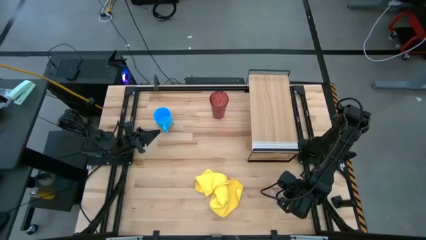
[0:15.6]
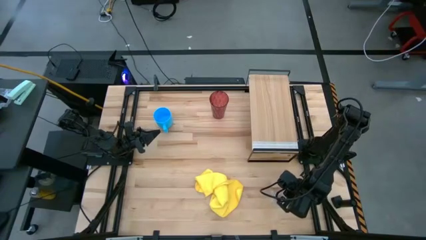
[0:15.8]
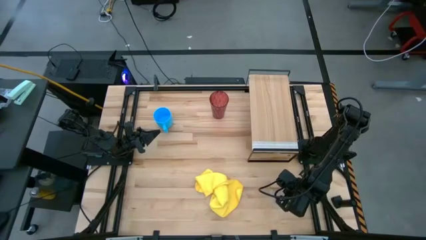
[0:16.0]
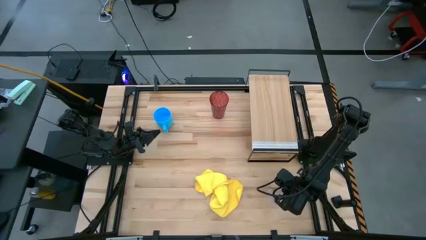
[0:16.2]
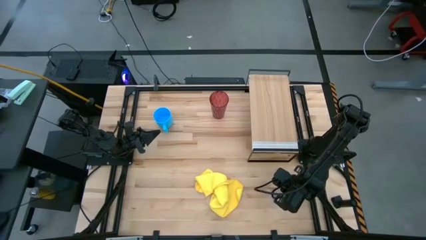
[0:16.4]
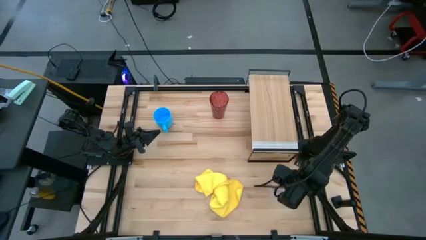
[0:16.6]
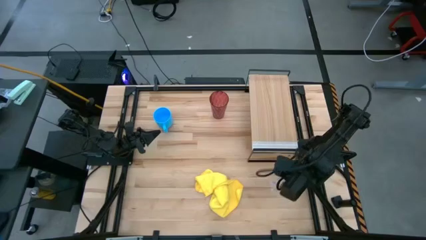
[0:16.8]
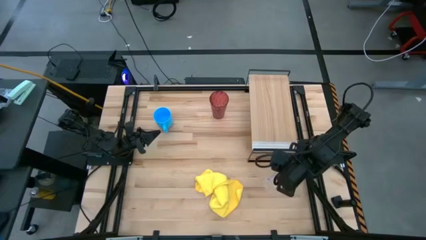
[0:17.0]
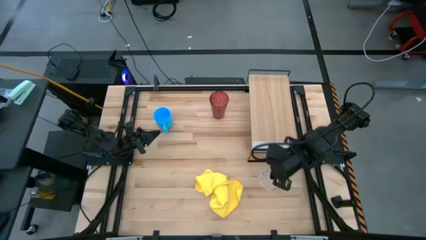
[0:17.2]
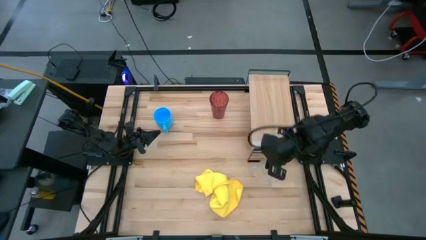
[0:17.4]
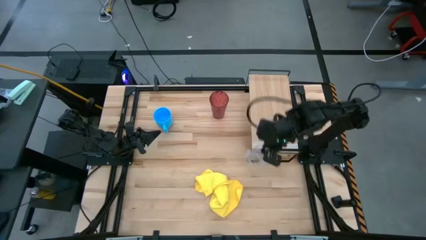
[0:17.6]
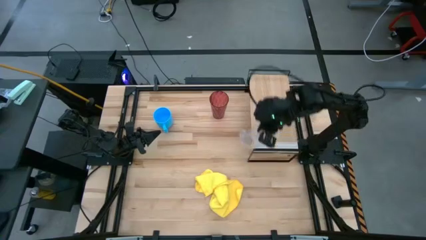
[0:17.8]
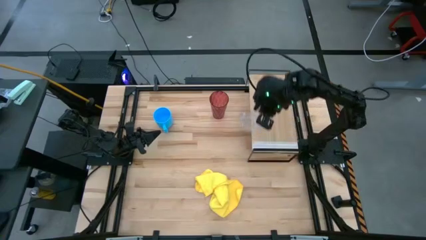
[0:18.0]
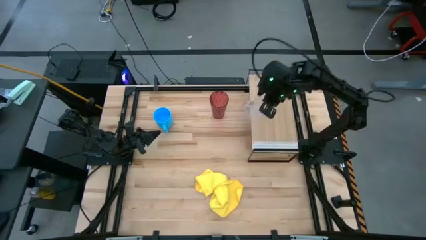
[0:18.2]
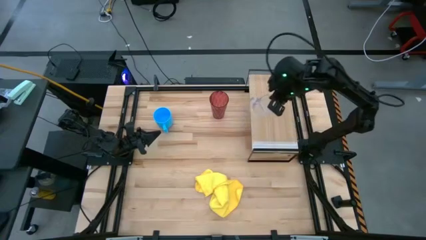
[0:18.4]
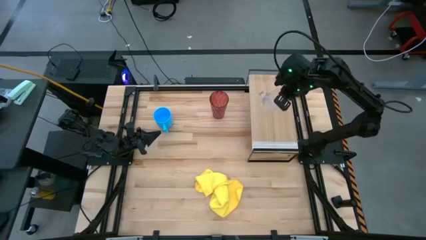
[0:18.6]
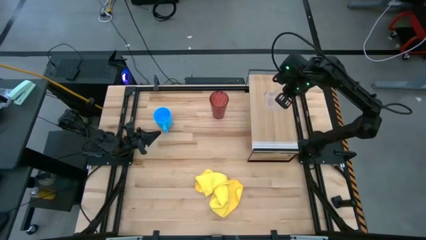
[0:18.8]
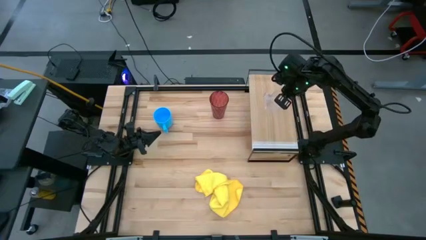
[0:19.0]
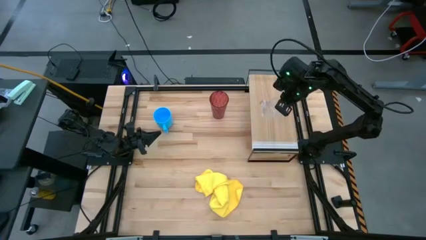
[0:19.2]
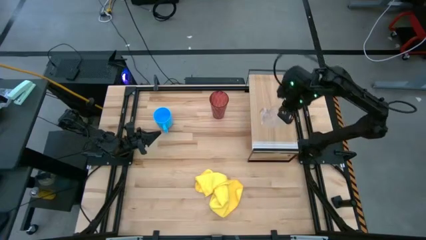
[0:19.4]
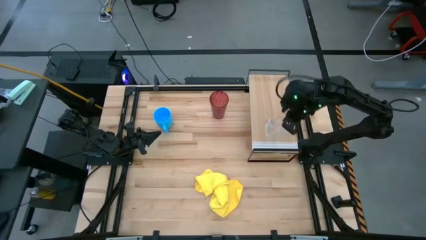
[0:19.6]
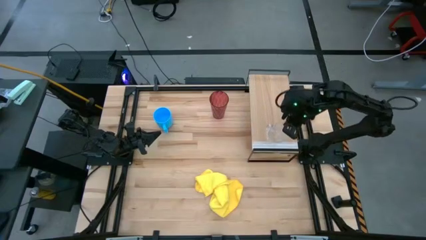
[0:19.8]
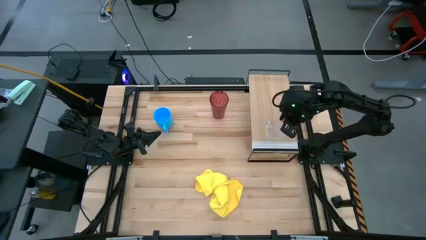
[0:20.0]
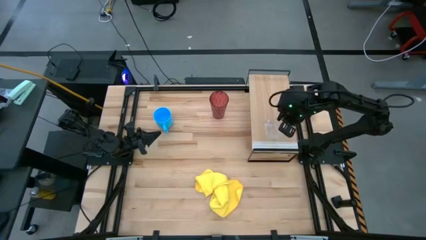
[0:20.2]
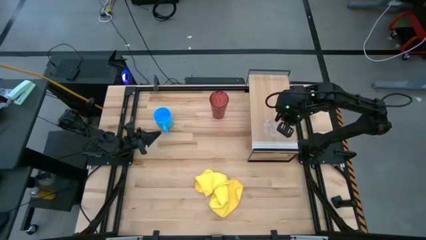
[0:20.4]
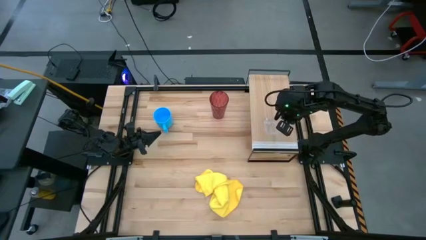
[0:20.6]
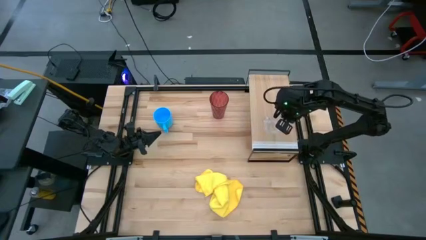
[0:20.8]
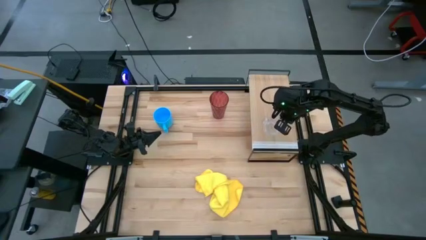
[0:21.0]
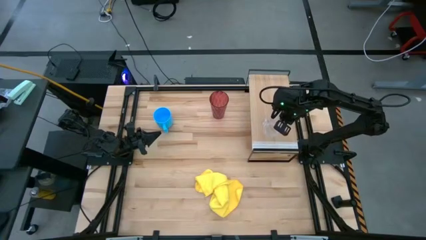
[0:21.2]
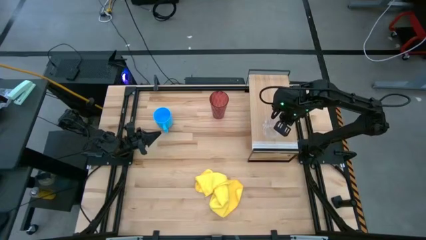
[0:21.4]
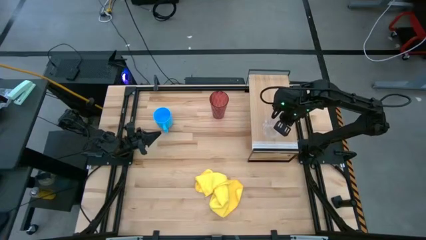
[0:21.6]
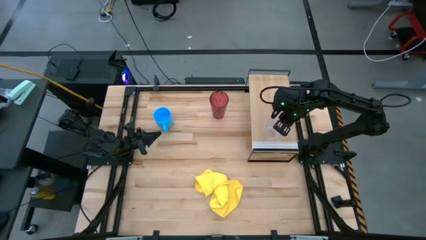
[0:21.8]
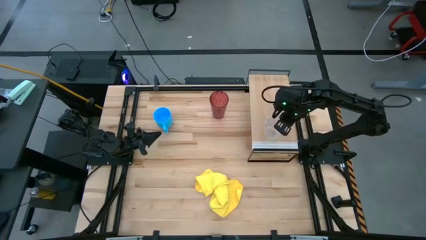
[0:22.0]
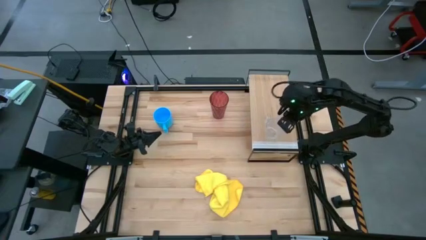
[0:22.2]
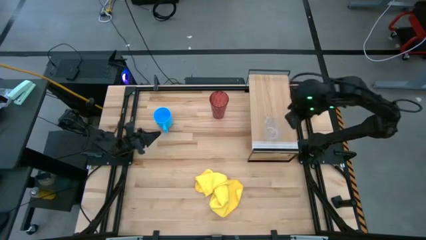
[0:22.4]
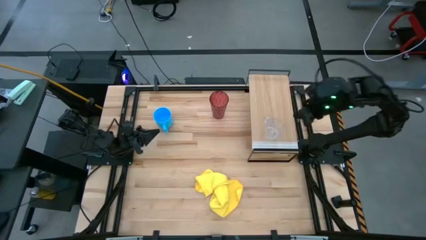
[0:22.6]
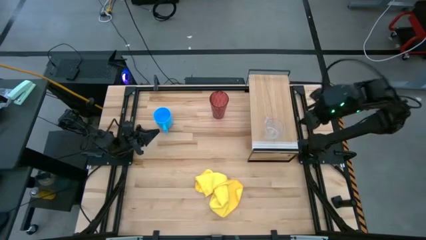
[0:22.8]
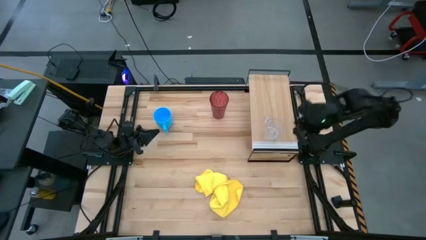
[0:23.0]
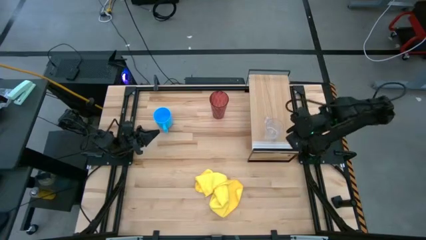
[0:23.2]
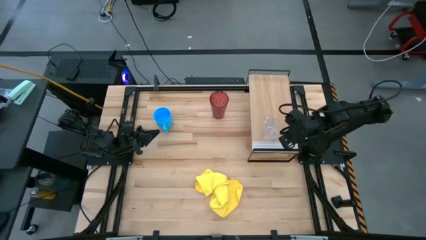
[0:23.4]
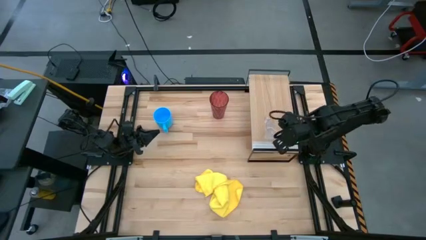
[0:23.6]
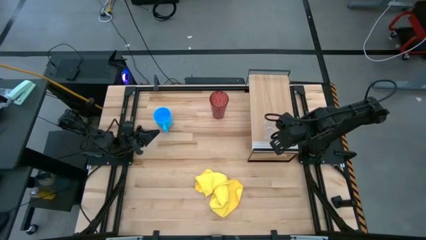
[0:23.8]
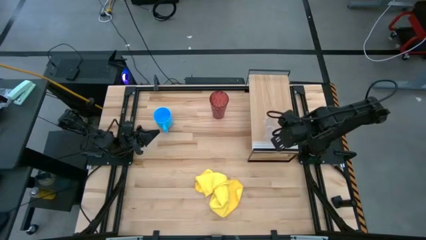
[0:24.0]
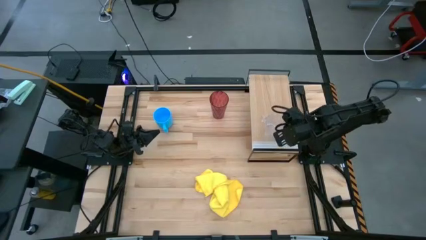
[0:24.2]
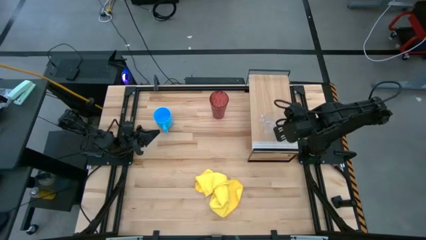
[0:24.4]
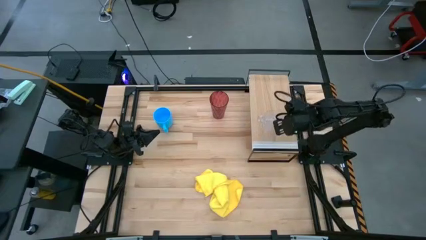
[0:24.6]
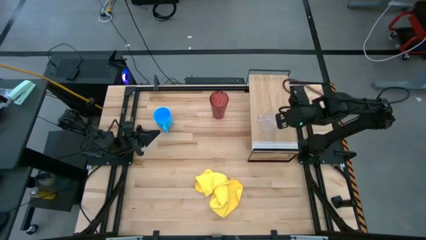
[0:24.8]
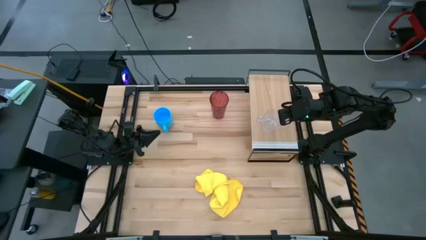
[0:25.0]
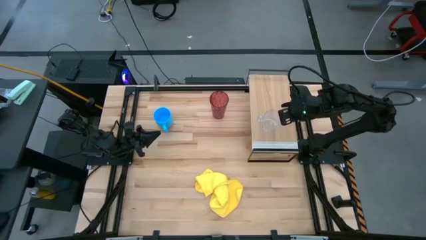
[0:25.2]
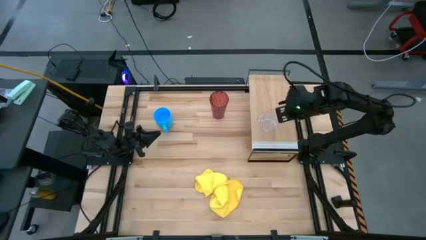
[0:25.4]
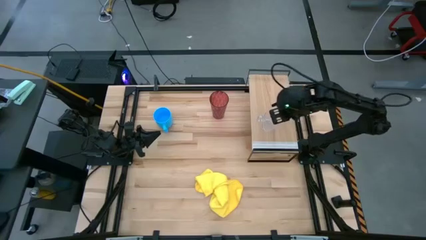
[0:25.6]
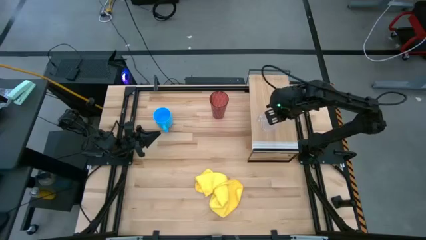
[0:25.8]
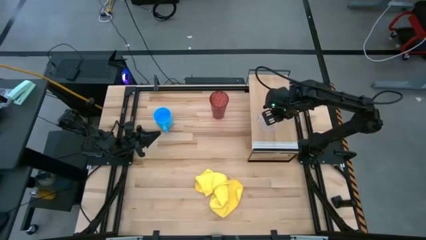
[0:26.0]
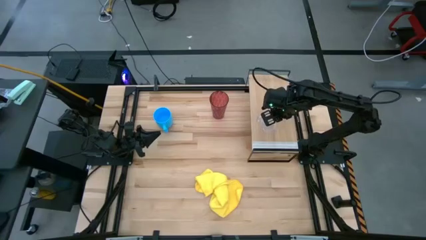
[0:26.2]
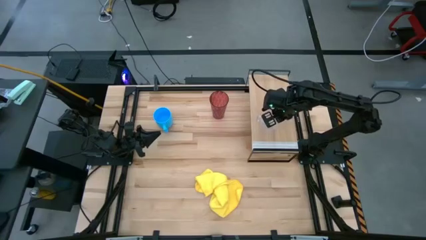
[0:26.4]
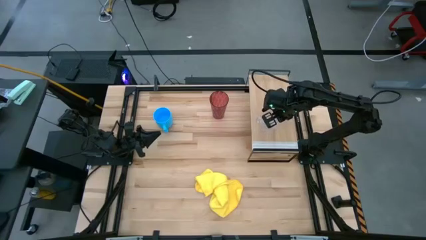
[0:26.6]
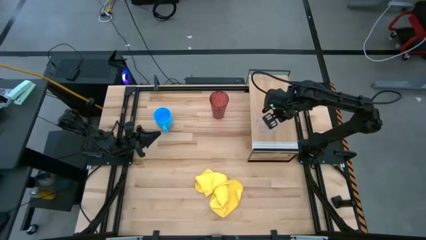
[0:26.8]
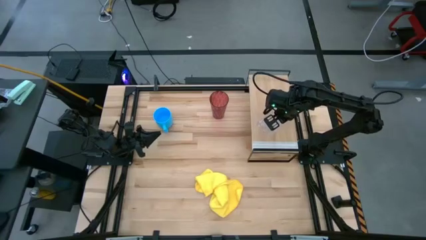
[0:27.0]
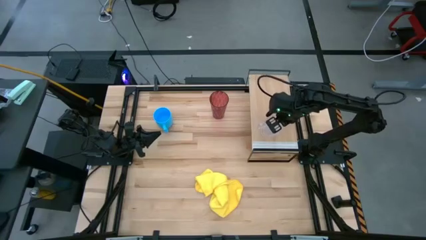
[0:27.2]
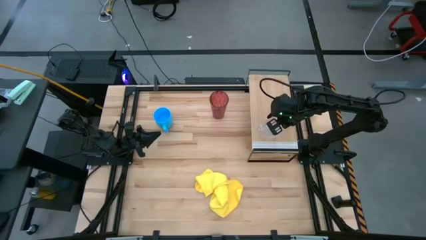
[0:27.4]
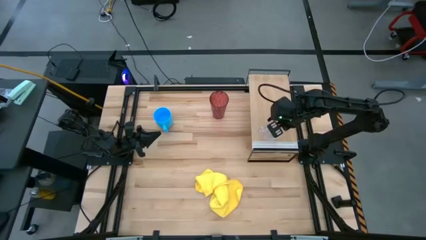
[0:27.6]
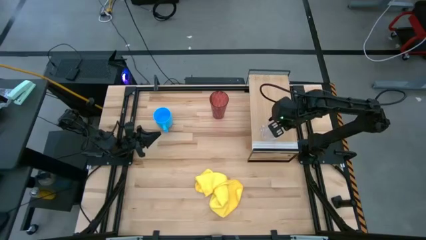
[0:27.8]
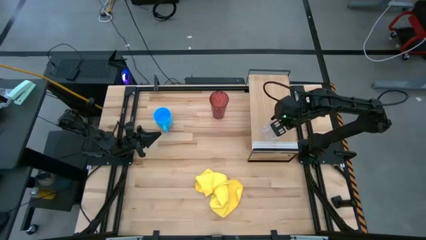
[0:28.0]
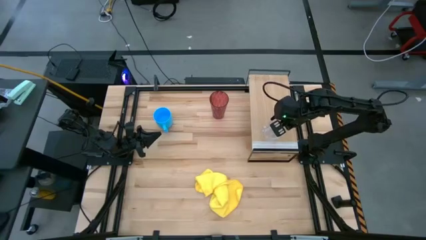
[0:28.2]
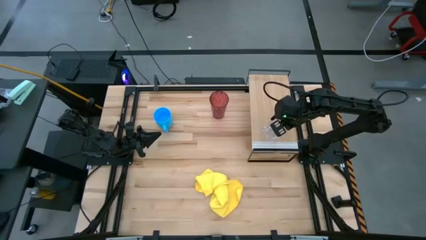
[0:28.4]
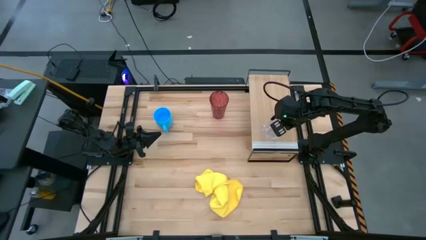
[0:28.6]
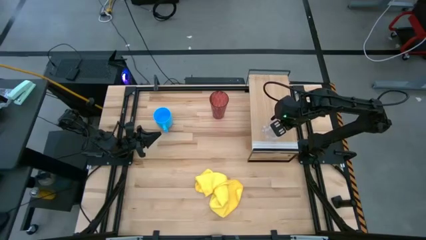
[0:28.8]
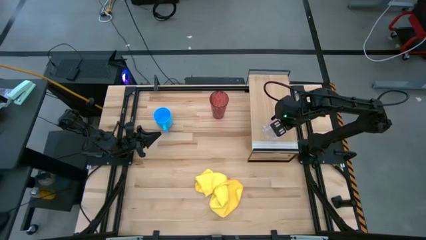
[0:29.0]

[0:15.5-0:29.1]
Task: Stack small to large cups/mugs on shelf
Put the transparent mug on the shelf
